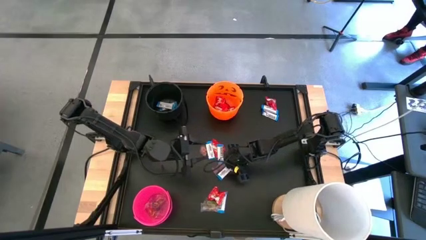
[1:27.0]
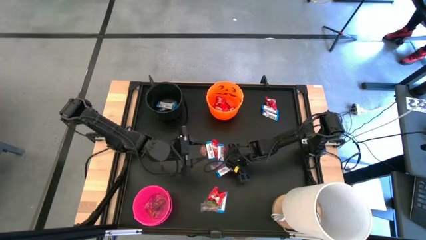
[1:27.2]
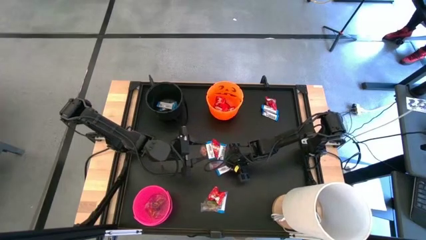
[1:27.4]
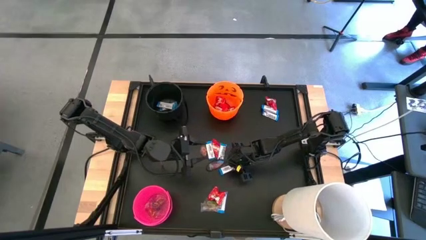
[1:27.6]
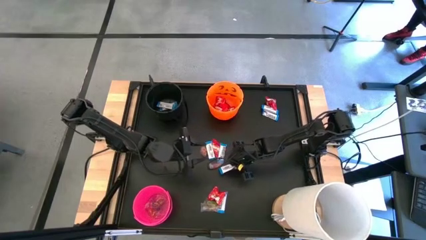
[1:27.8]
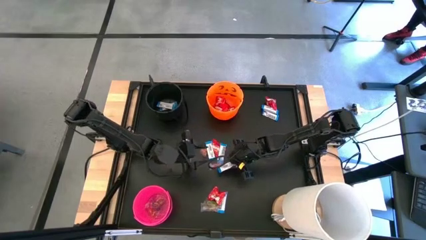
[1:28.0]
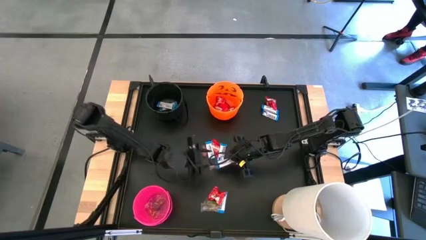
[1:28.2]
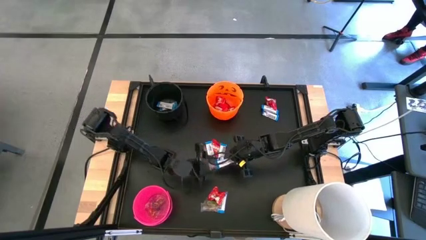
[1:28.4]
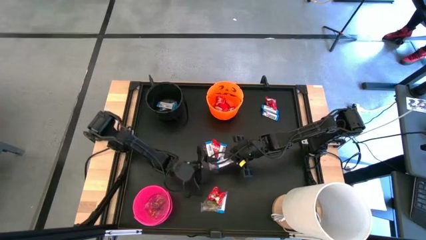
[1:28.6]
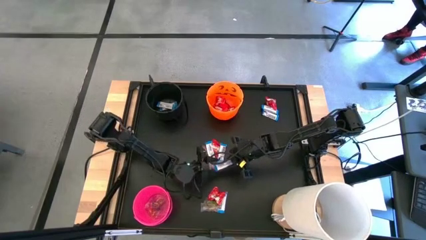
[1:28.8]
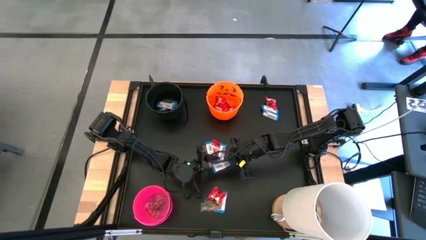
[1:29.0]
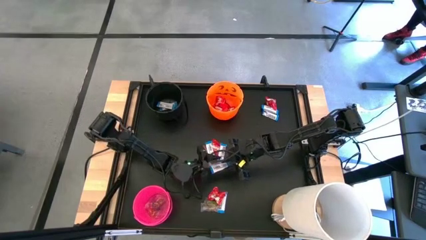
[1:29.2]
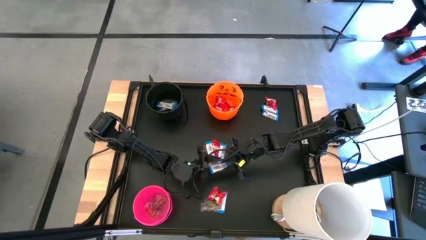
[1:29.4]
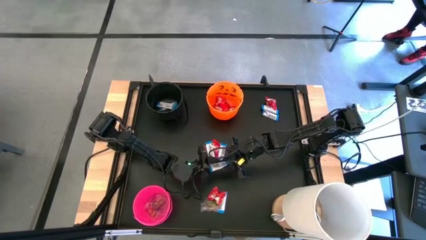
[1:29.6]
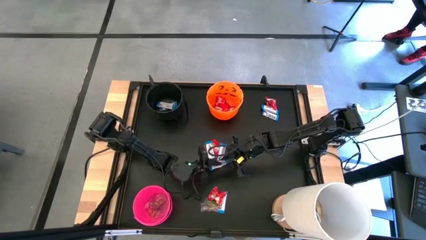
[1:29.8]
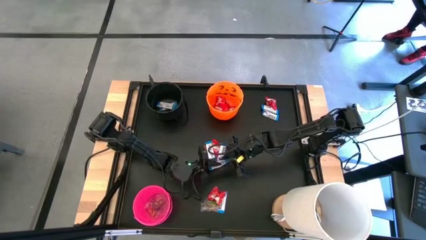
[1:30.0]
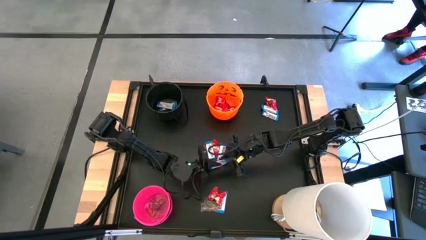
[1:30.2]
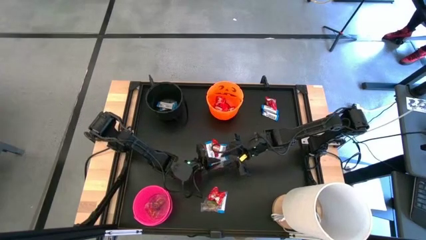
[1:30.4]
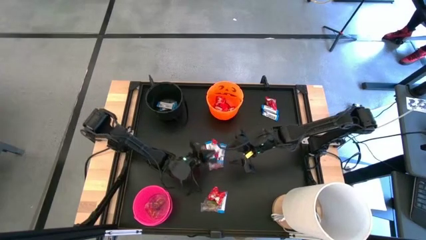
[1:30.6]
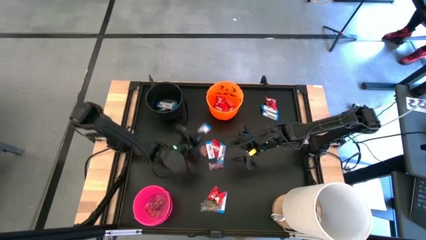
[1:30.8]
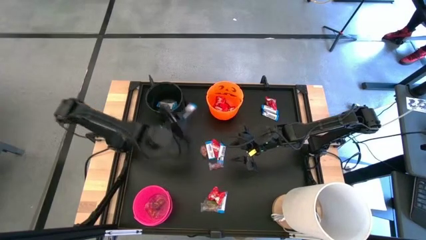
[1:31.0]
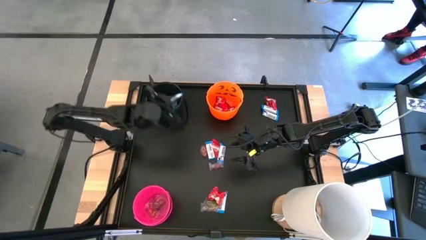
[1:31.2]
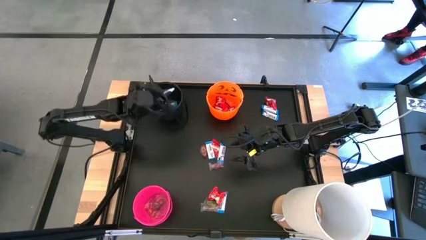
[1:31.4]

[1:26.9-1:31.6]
Task: Sort candy
Put the middle right white candy into the black bin

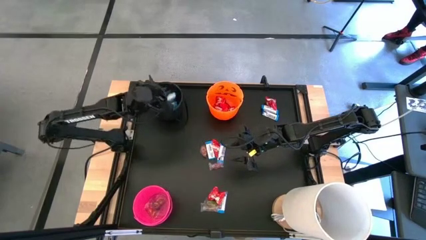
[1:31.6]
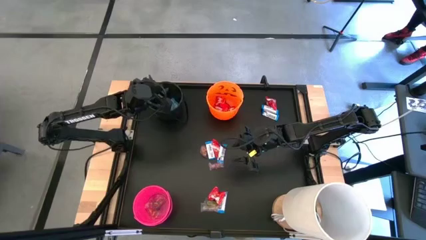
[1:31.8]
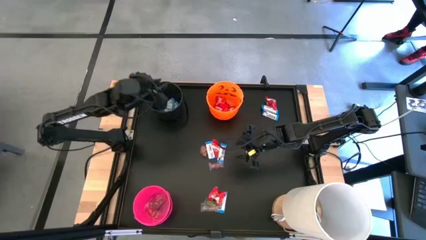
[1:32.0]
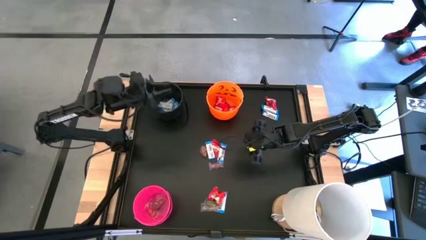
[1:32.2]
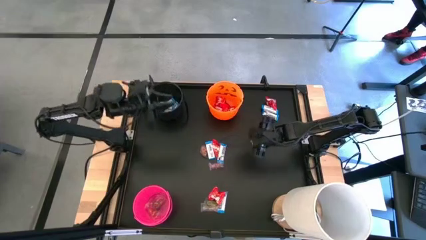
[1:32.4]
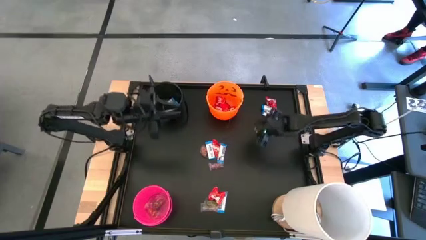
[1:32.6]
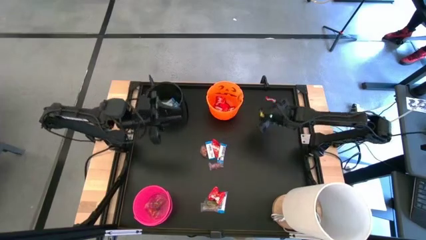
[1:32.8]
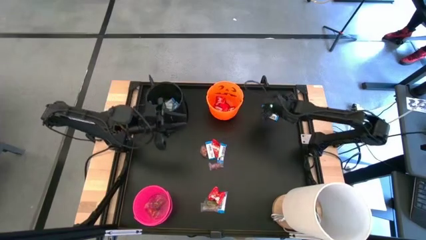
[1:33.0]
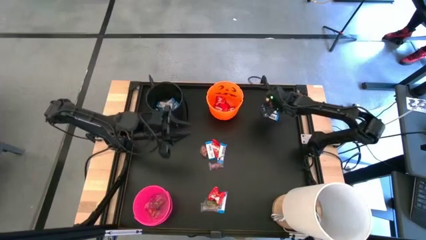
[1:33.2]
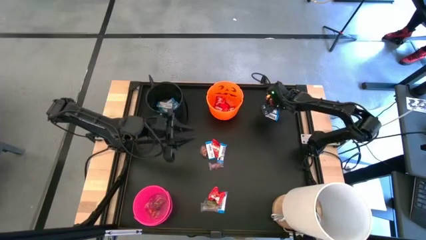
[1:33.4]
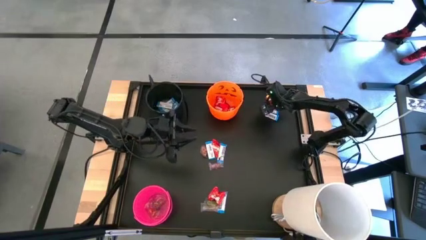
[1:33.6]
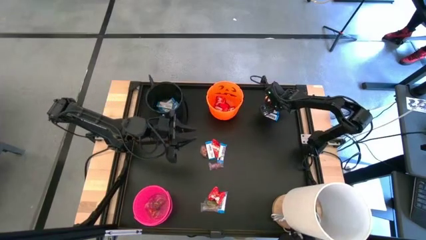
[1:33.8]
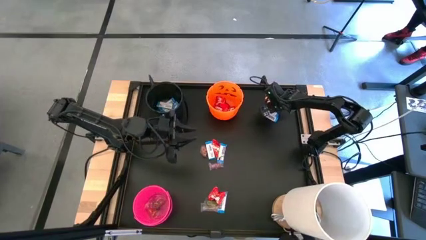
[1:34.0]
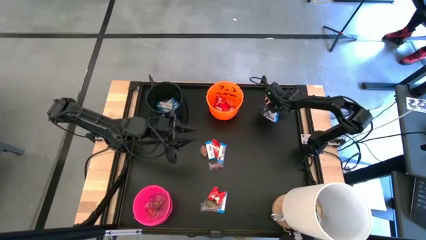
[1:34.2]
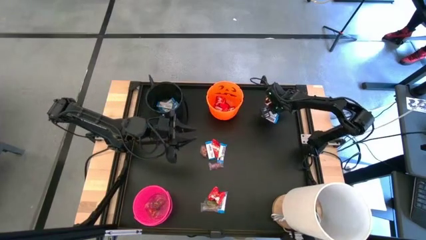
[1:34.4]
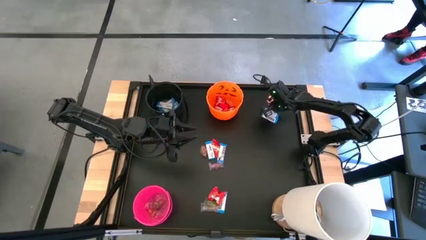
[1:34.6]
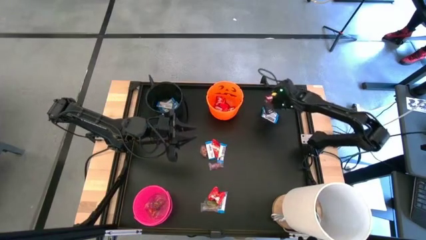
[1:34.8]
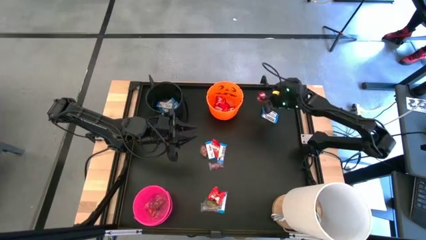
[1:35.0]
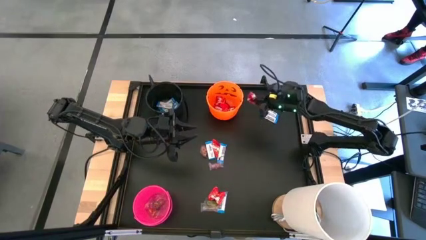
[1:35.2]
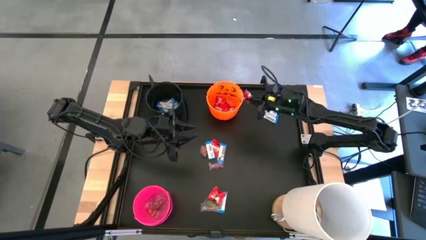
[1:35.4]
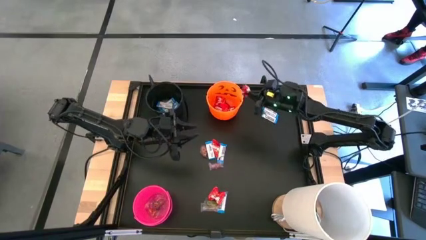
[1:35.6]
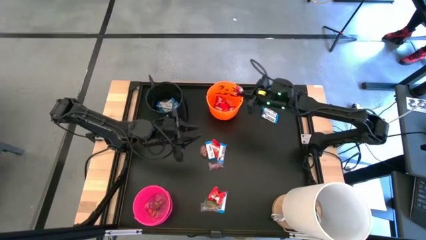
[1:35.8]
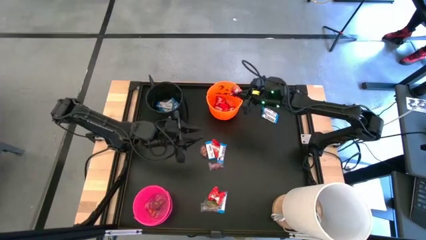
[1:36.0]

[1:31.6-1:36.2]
Put the top right red candy into the orange bin

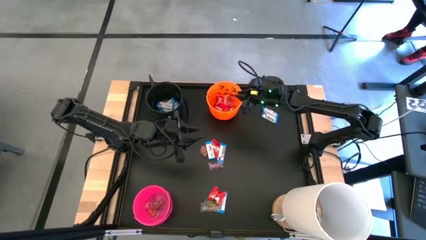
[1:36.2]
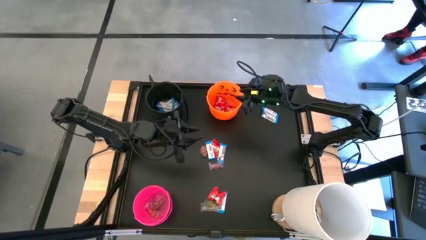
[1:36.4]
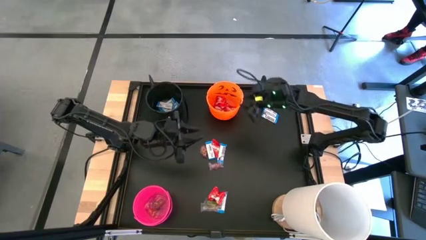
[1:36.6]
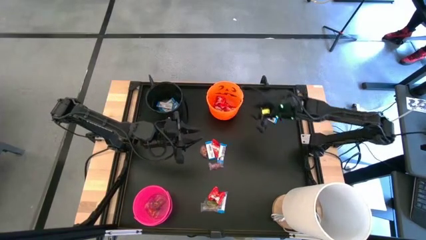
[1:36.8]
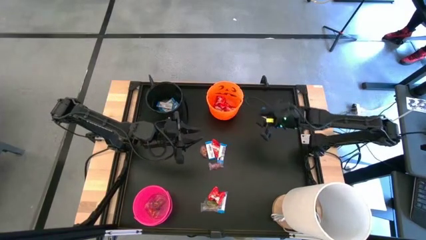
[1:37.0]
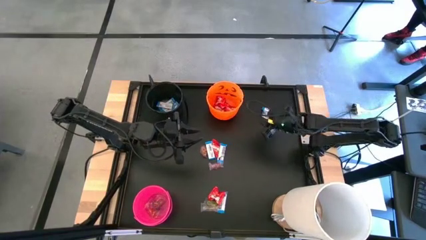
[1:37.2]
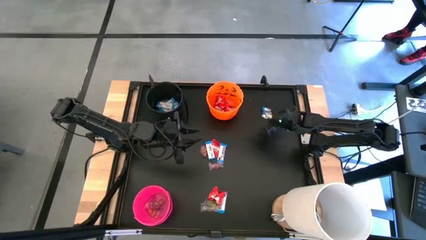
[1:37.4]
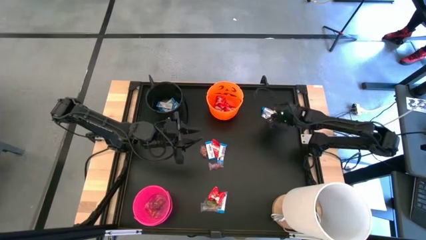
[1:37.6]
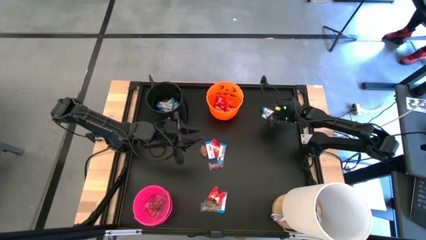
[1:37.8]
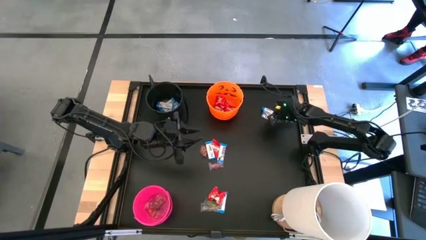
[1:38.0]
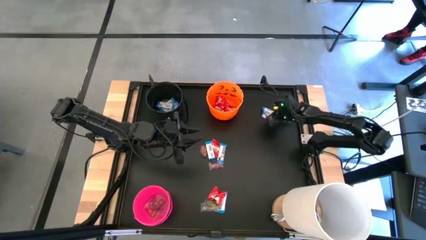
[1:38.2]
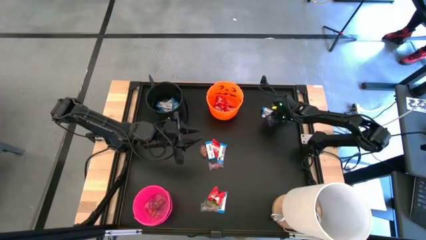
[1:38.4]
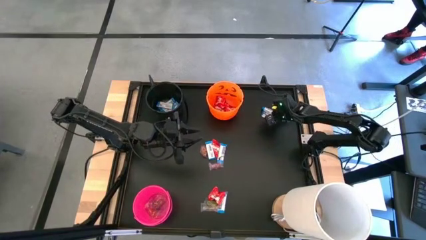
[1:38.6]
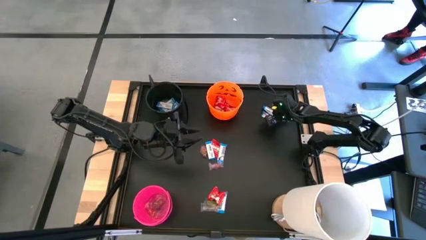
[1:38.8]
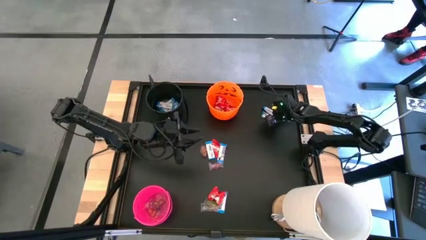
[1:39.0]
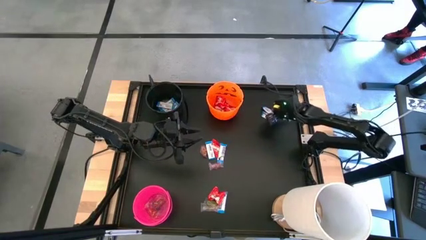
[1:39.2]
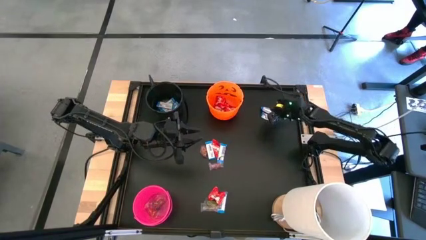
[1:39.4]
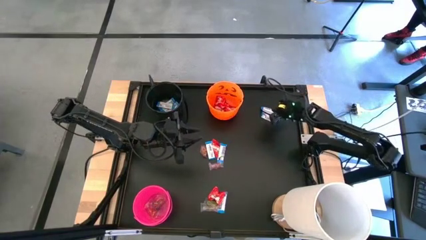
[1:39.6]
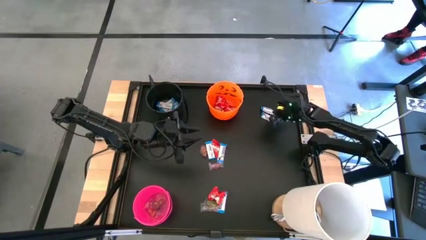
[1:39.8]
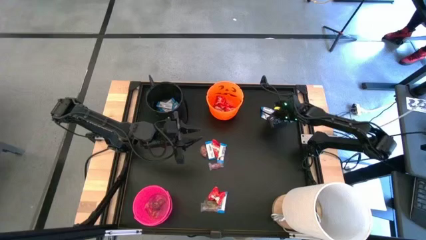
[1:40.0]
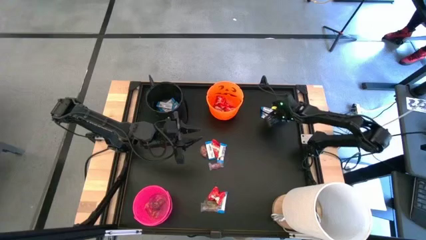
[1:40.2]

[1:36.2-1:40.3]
Put the top right white candy into the black bin

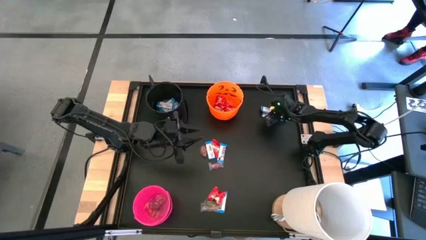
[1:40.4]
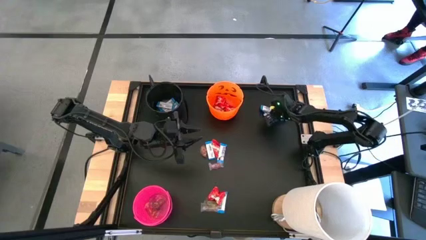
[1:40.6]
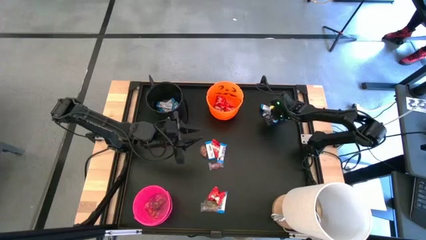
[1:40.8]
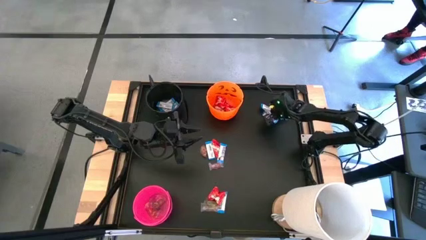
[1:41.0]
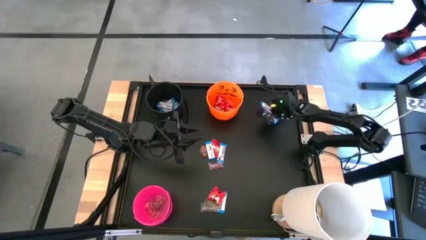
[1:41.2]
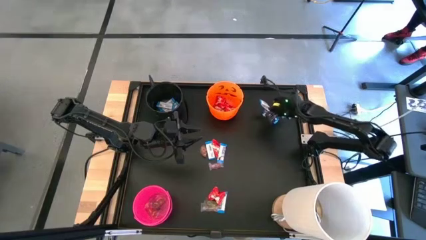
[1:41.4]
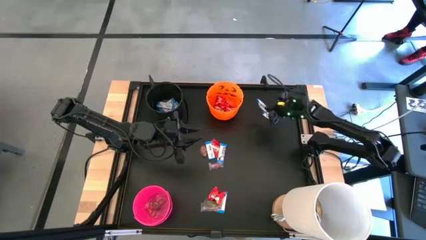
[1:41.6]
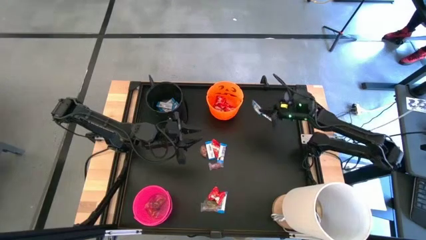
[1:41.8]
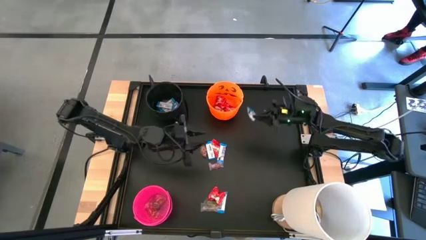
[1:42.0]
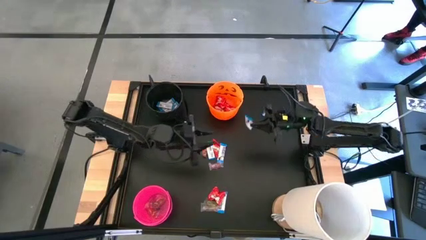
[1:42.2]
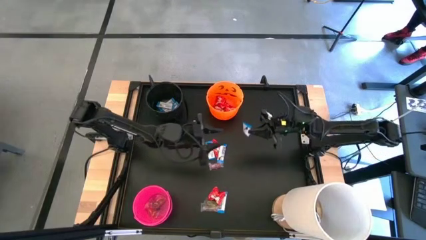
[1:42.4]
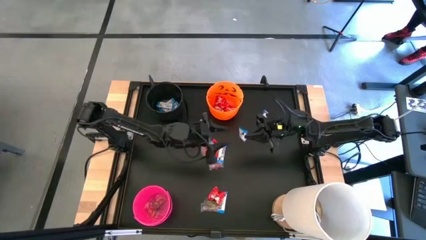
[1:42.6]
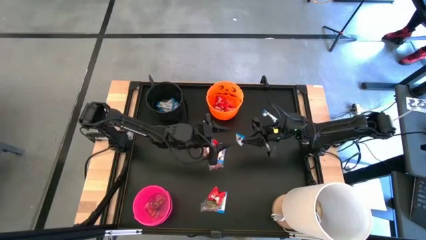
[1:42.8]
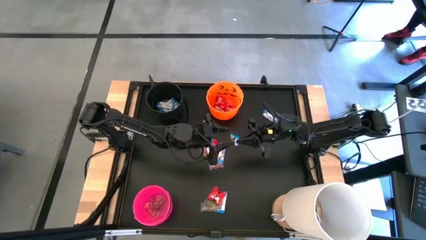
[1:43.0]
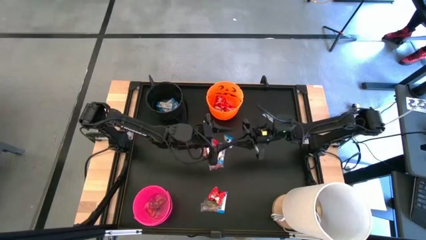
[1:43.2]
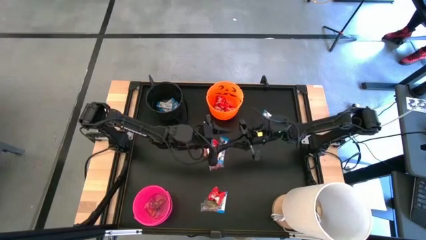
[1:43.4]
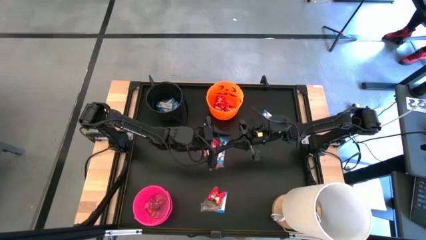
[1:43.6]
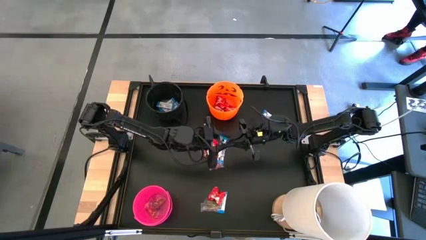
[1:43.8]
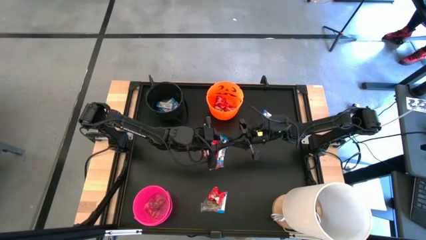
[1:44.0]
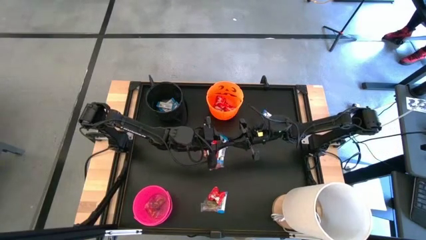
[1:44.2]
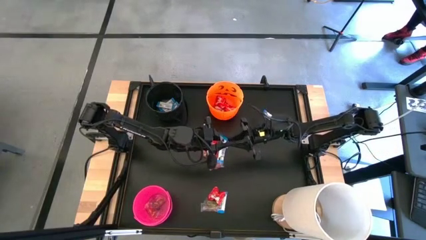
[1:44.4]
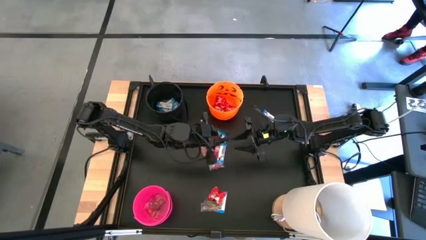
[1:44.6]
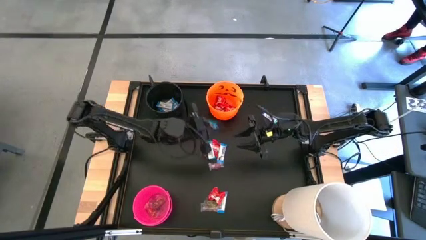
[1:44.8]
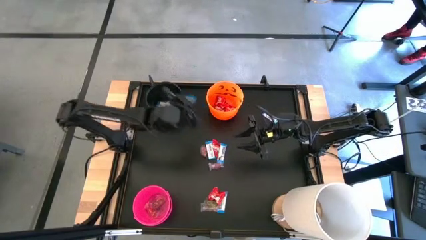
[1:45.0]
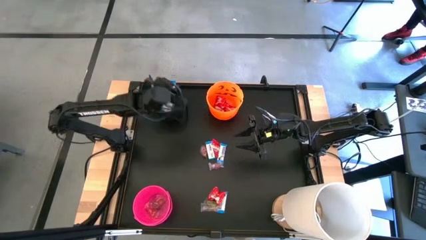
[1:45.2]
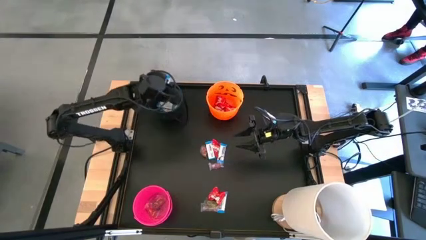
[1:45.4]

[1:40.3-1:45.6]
Put the top right white candy into the black bin
